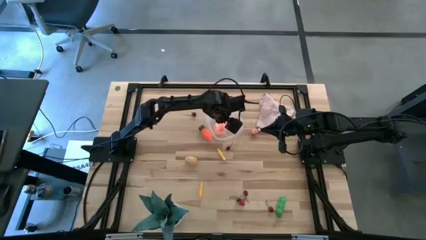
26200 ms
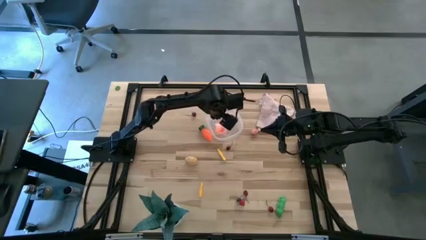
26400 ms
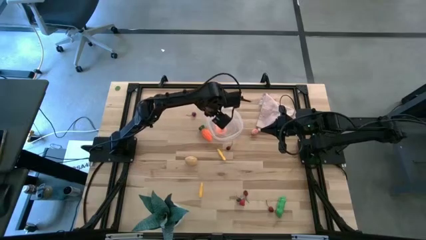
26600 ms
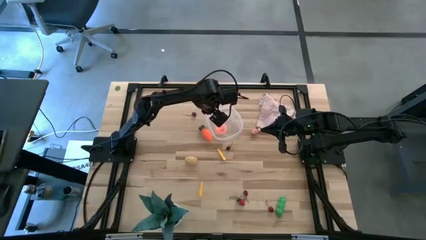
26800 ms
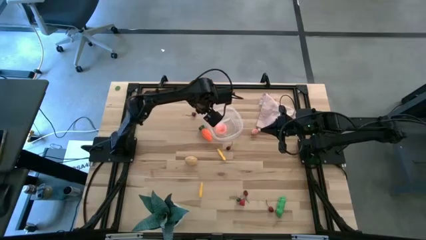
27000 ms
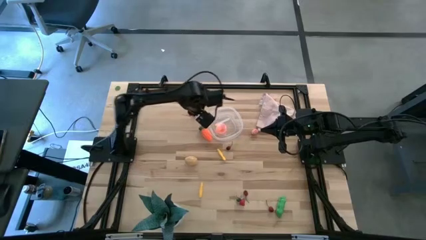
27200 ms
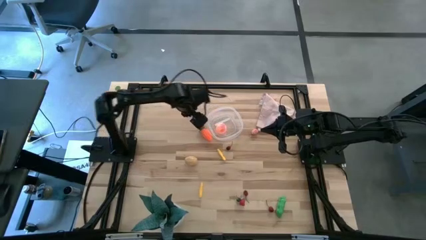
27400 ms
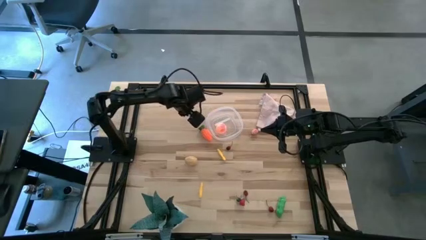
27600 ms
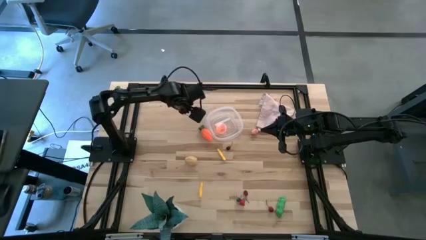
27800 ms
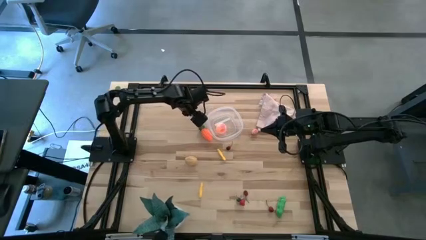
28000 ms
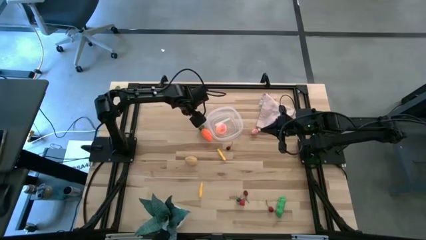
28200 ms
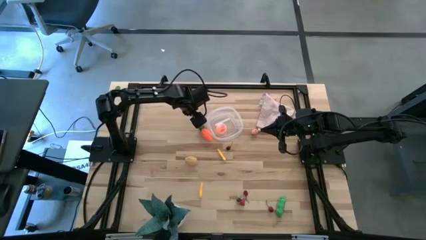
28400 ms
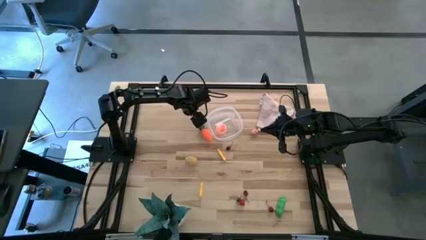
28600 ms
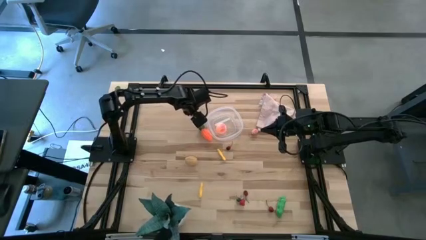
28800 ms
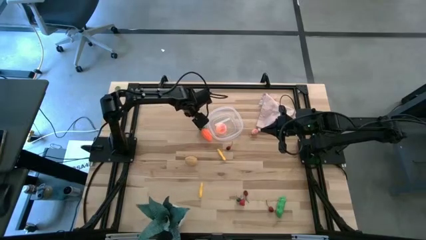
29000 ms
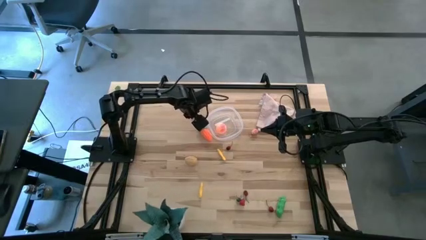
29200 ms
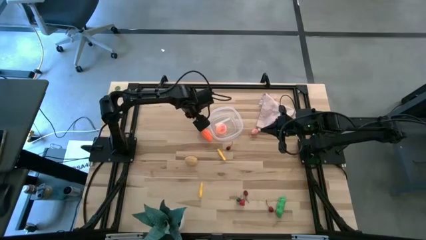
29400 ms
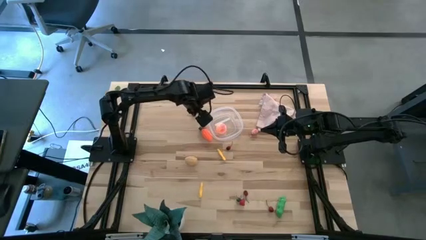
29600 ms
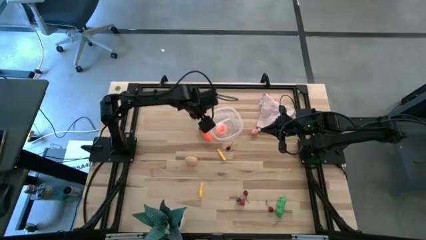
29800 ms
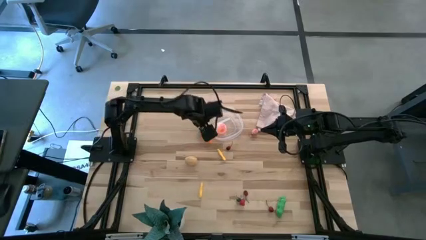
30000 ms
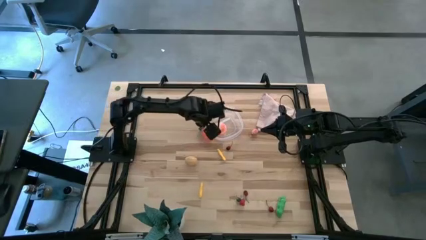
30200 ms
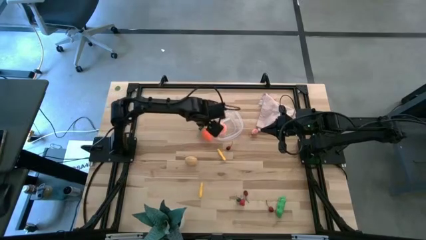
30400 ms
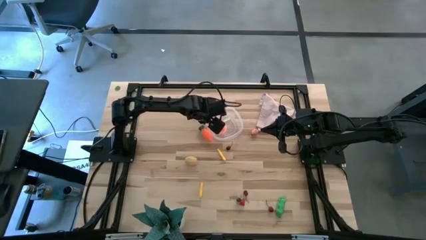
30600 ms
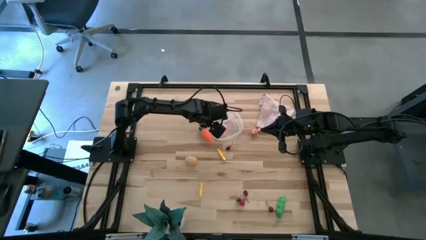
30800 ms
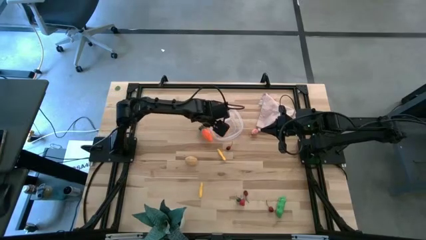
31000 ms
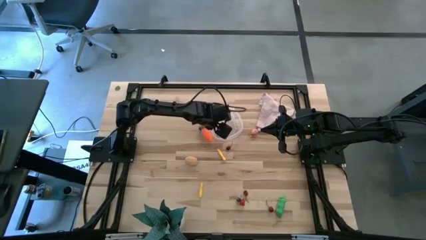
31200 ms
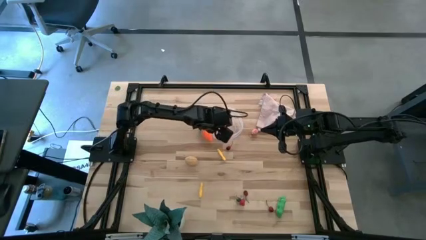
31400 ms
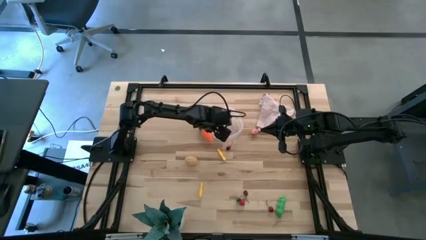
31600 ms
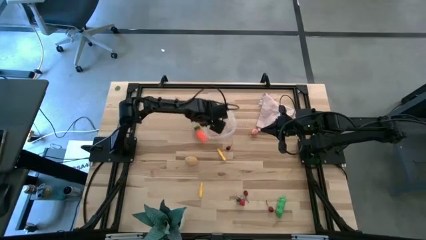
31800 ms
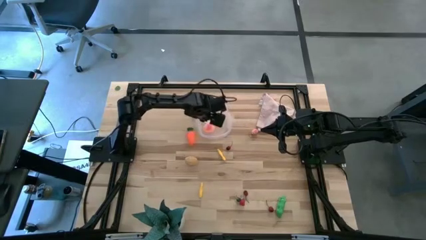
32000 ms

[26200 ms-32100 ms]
Task: Pick and placing Produce into tupperware
Adjust the transparent bin

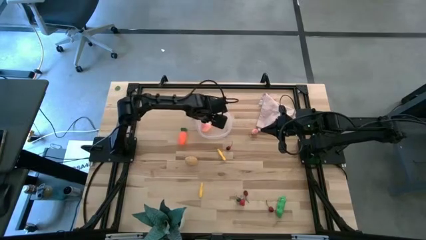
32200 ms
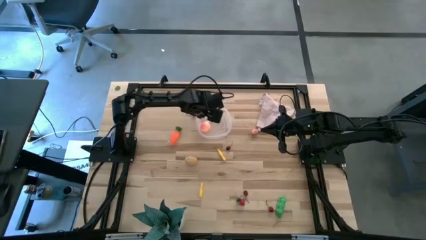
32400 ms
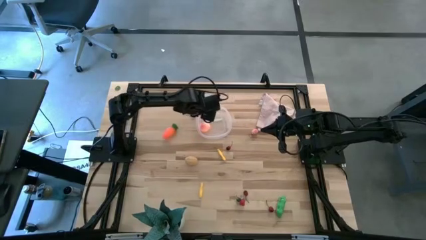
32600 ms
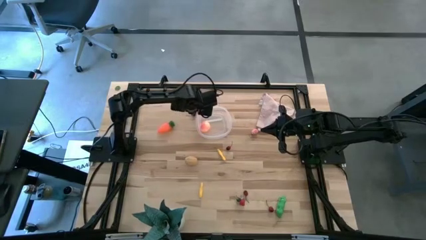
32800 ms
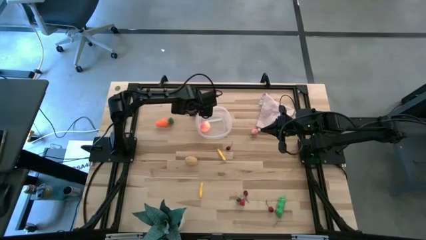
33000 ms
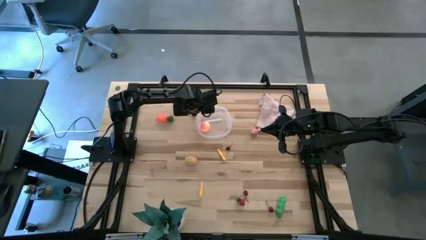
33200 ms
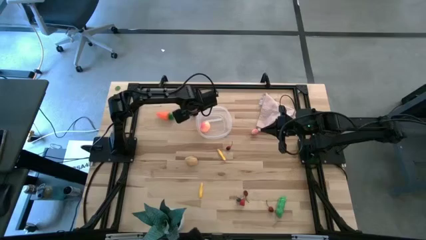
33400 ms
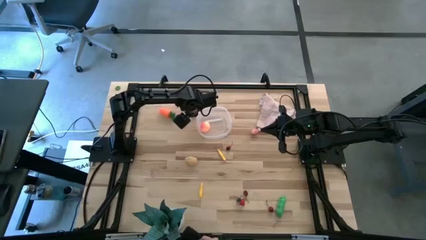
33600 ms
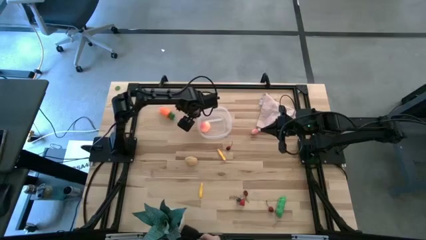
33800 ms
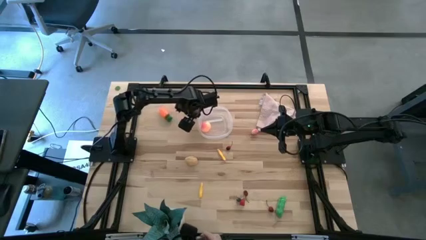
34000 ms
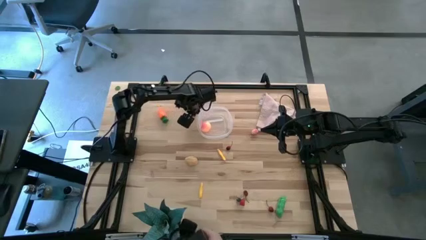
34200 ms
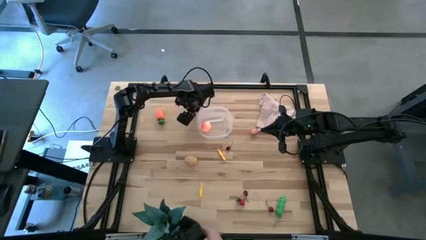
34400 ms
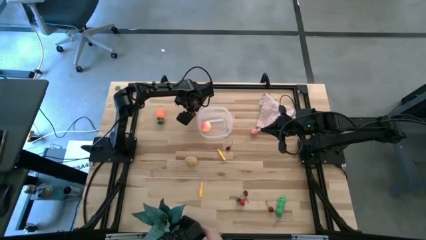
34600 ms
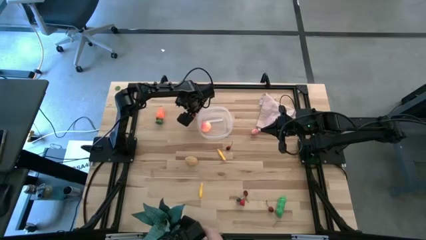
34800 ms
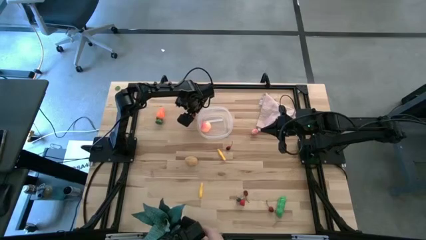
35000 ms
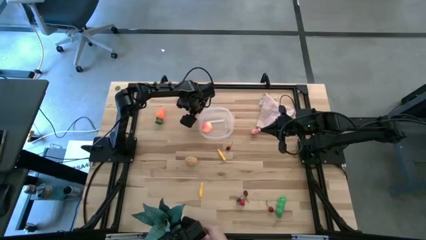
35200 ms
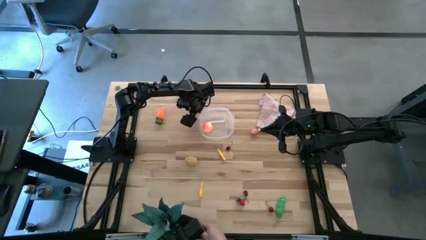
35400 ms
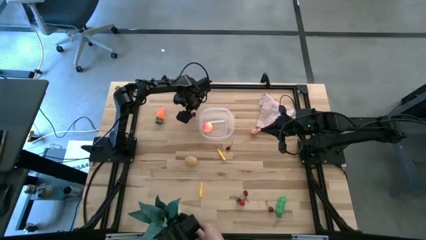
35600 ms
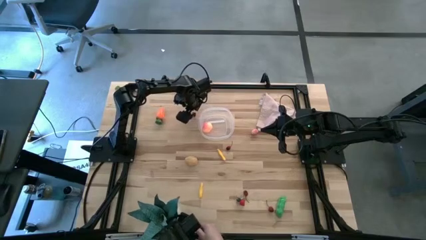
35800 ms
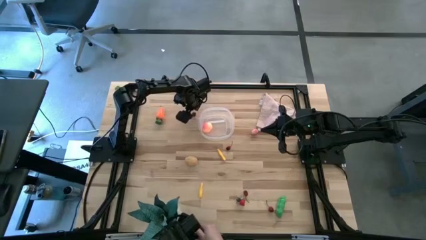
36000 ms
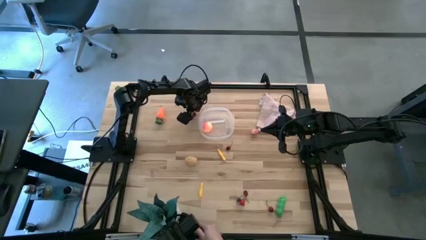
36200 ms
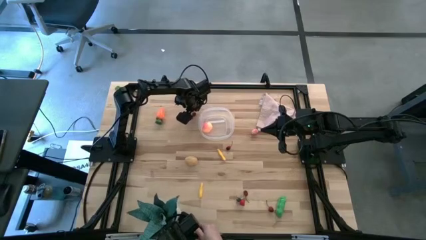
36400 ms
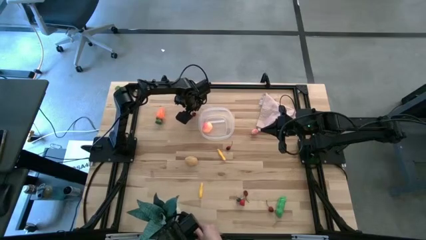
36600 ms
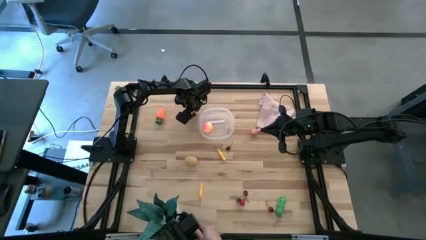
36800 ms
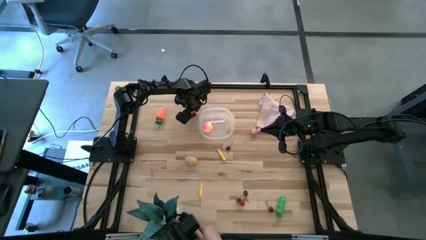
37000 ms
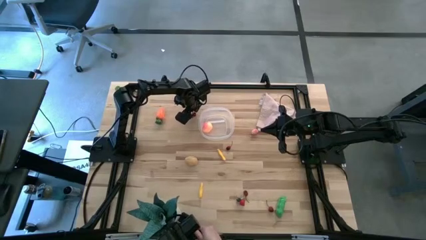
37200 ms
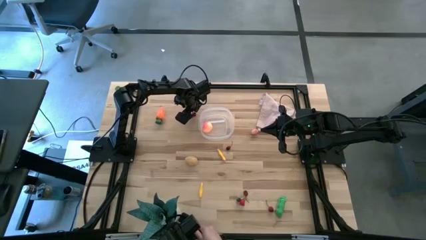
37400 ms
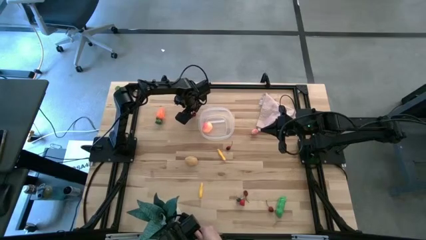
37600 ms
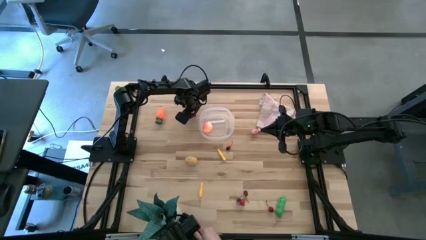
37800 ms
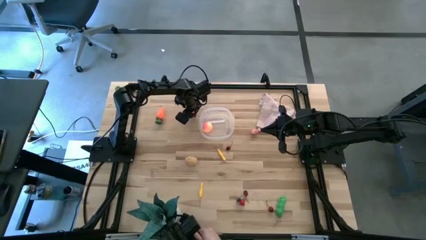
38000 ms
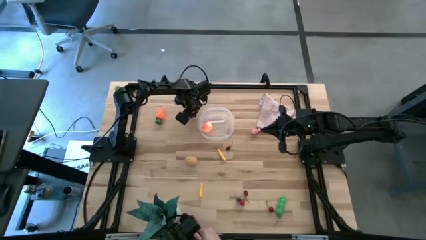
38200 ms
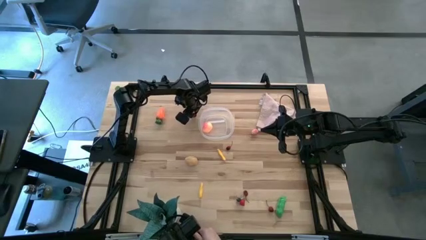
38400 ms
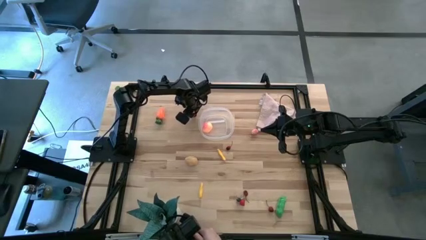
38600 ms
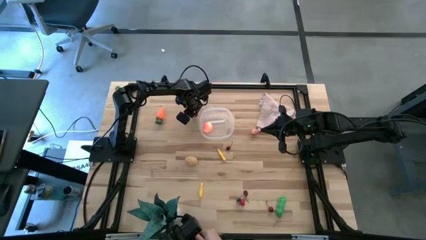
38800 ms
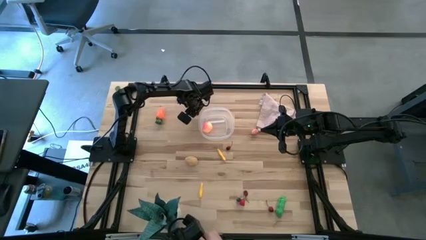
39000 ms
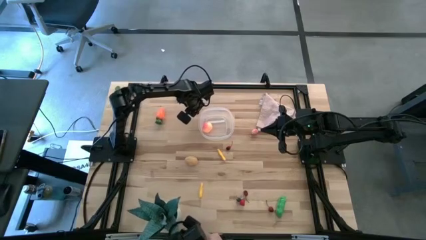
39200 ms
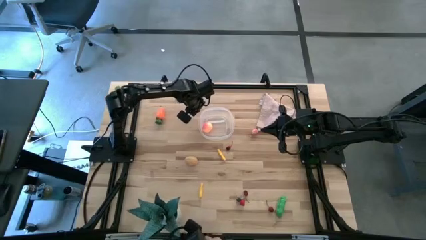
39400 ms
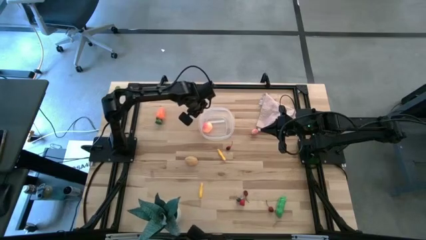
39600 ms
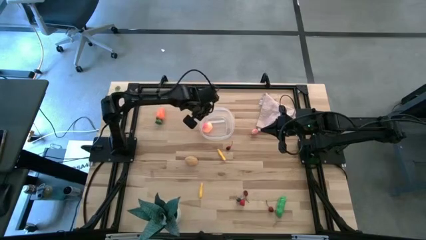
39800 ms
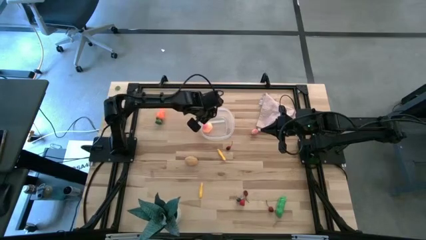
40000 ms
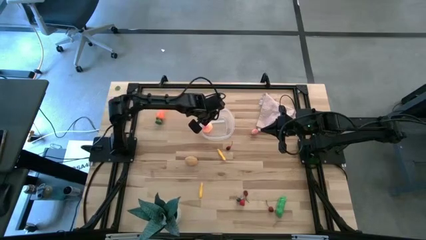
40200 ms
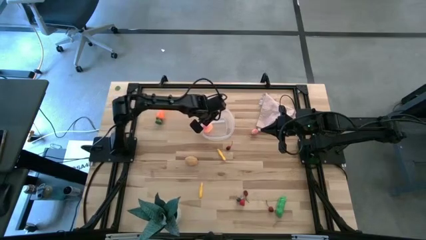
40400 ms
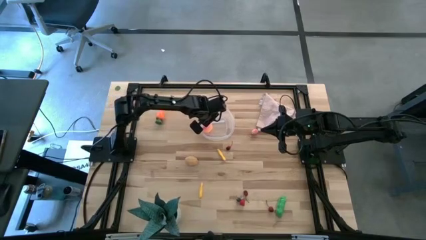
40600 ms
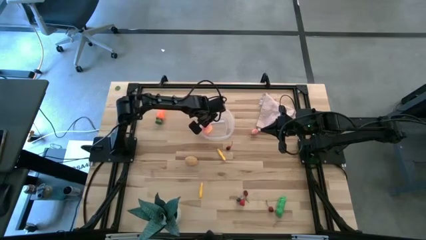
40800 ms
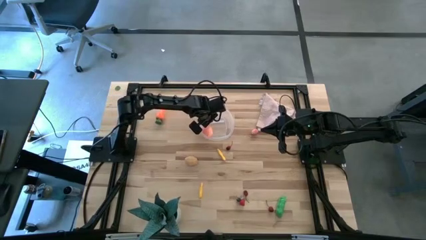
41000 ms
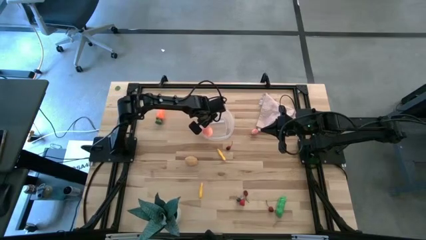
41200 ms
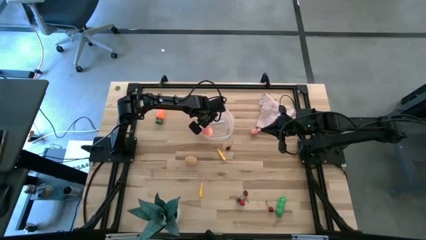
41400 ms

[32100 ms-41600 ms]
Put the red cherry into the transparent bin

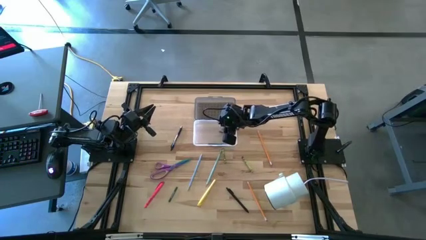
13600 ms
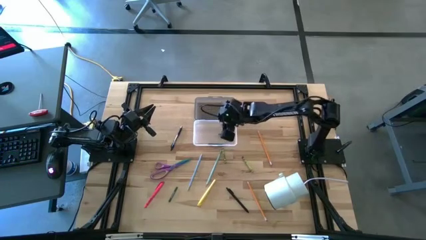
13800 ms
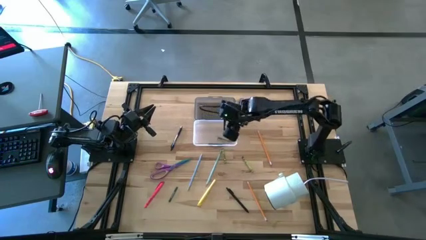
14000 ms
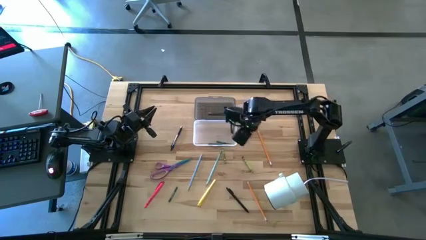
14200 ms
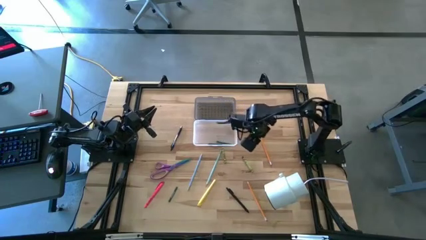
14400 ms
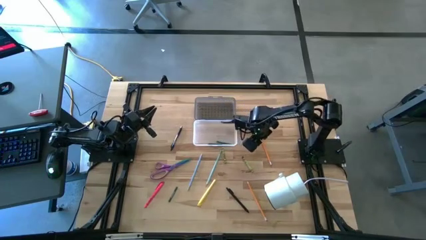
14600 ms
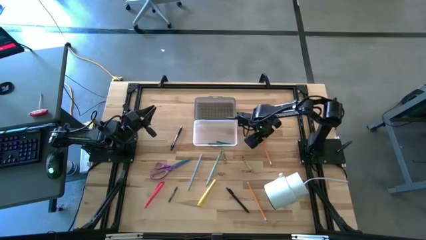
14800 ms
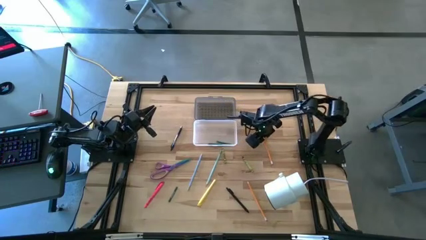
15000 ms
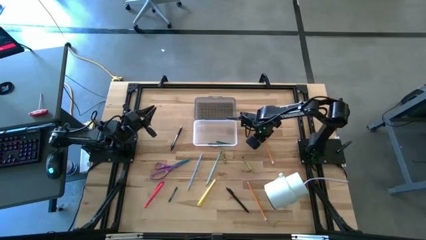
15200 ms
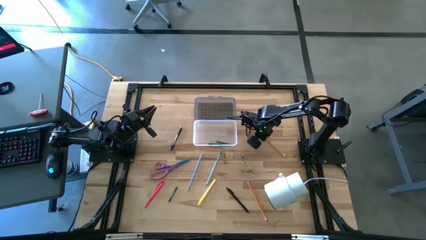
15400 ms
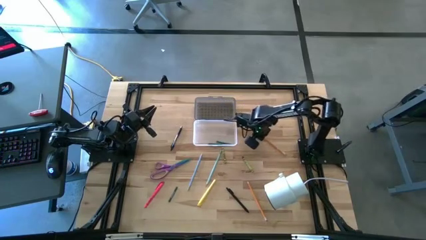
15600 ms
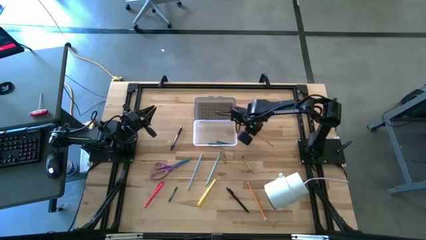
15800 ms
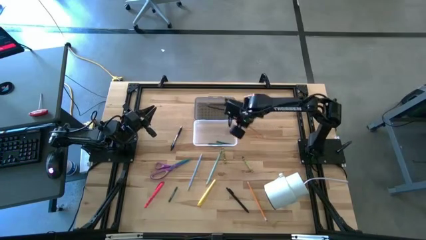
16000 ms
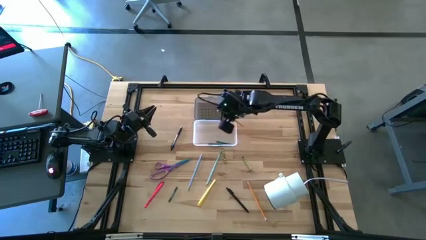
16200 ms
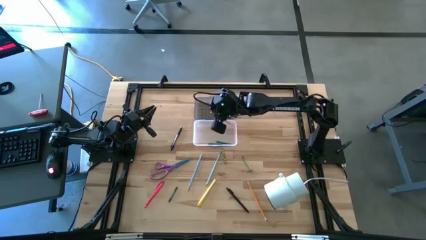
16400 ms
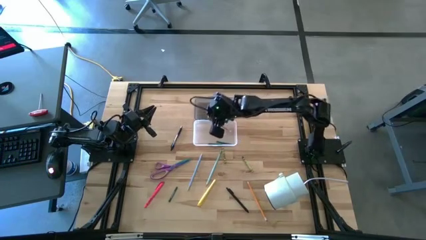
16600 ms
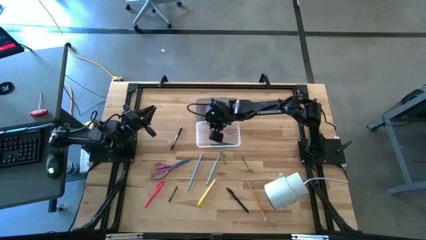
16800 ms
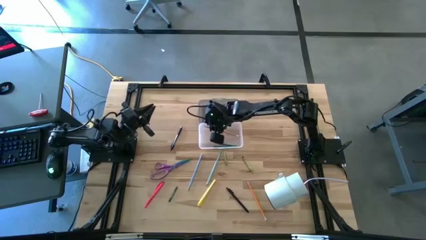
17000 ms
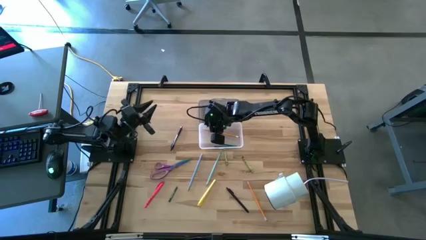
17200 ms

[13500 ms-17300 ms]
Task: Pick & place school supplies into a supply box
Put the top orange pencil into the black supply box
